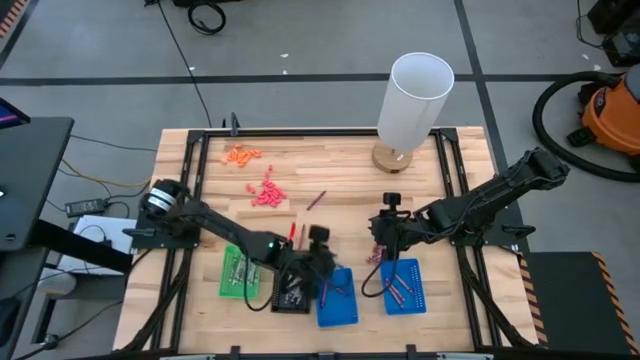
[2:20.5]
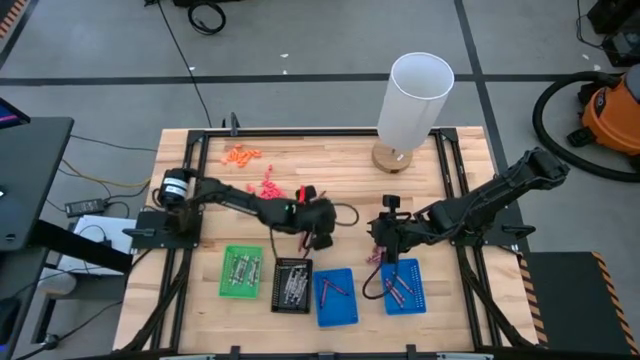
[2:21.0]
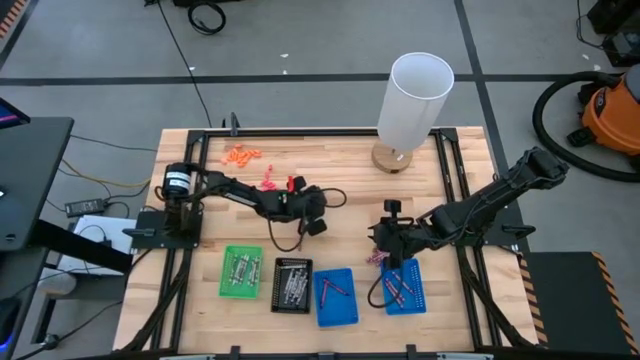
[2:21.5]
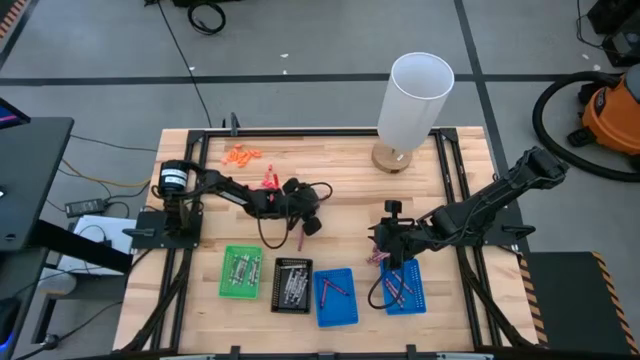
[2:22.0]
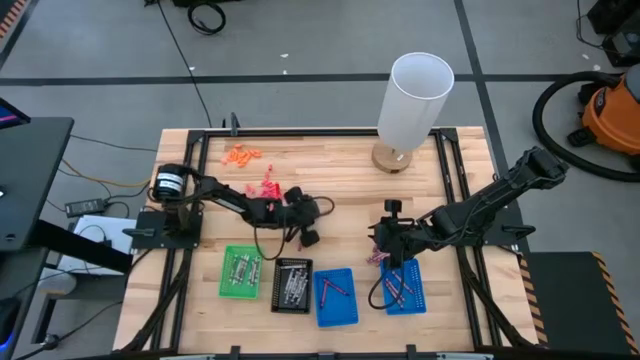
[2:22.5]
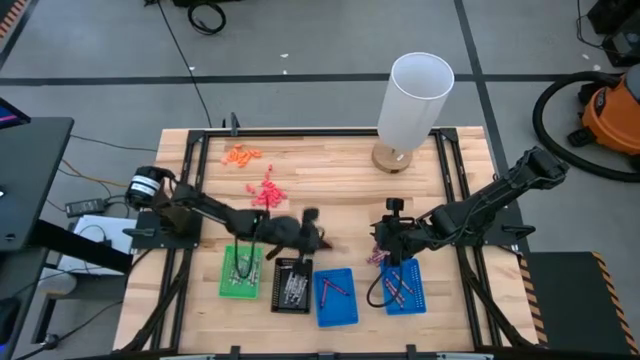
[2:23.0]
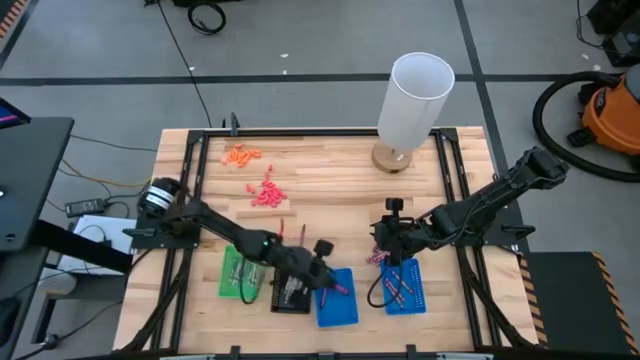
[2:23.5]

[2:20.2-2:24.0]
Task: Sort crayons
Put the red crayon into the left blue bin

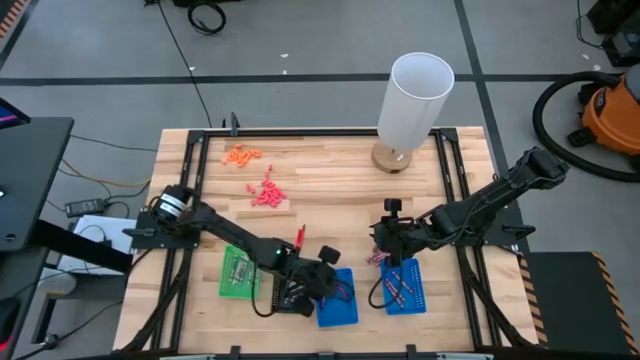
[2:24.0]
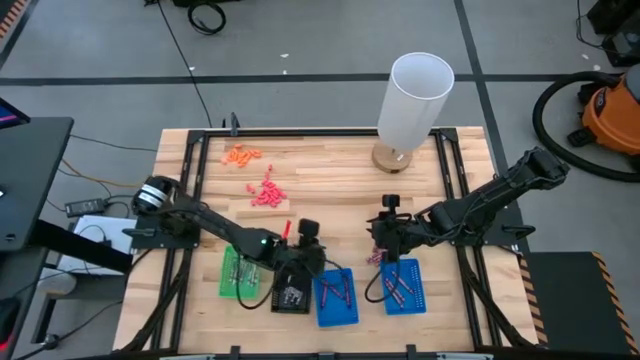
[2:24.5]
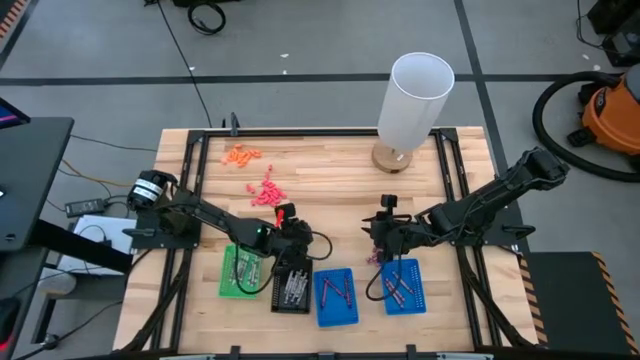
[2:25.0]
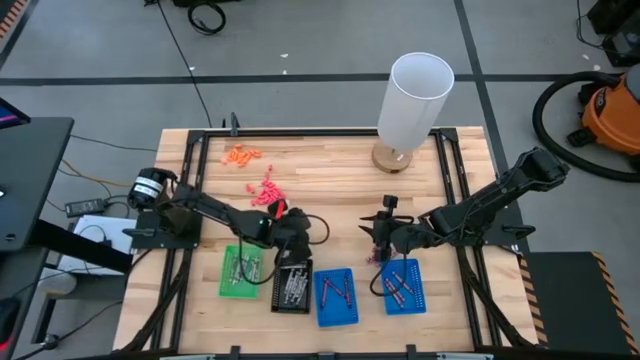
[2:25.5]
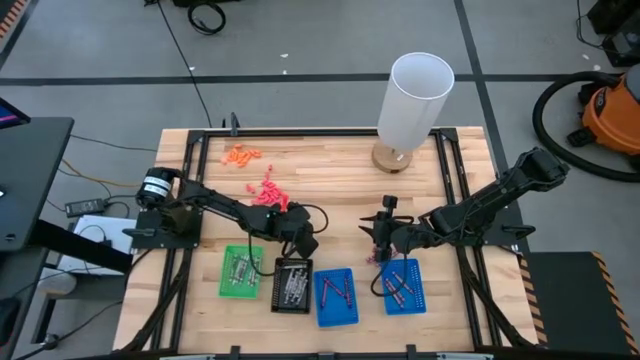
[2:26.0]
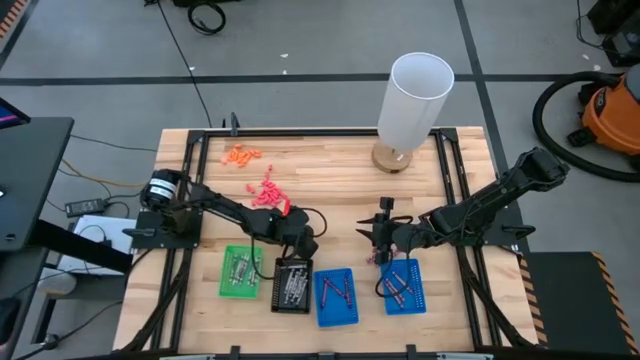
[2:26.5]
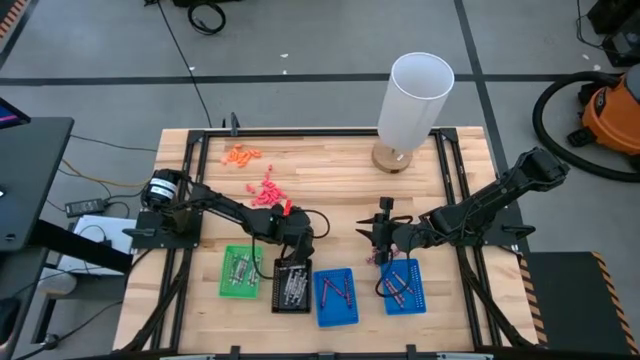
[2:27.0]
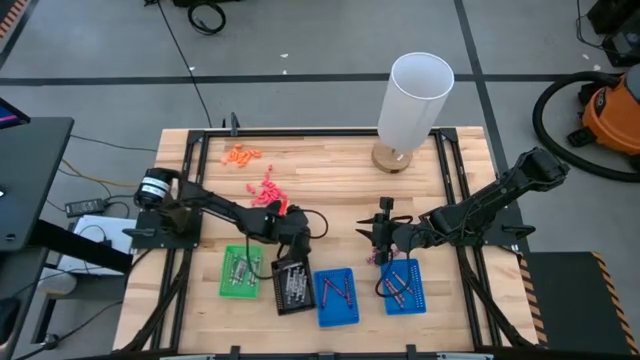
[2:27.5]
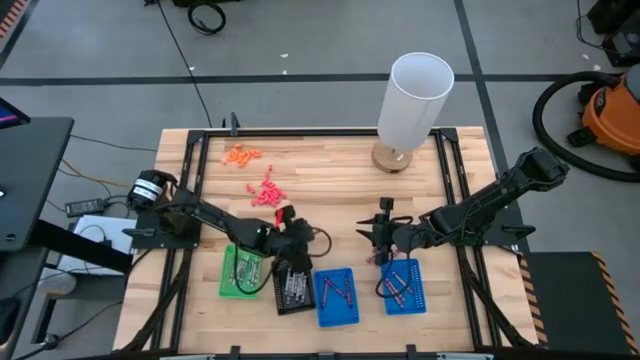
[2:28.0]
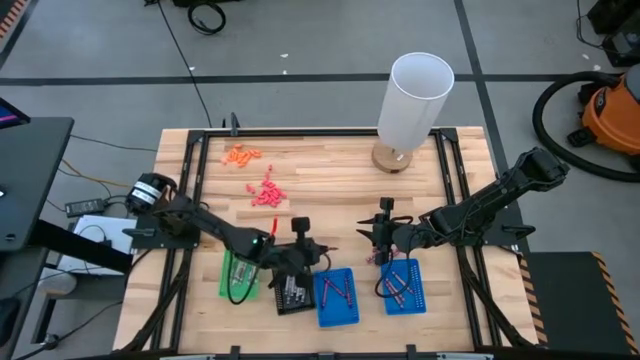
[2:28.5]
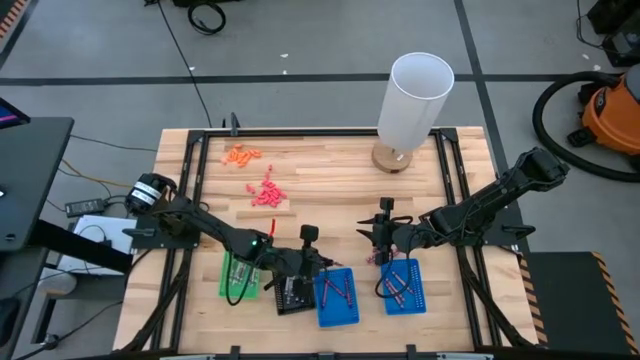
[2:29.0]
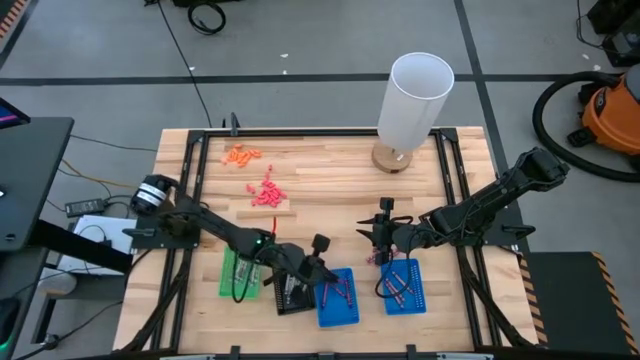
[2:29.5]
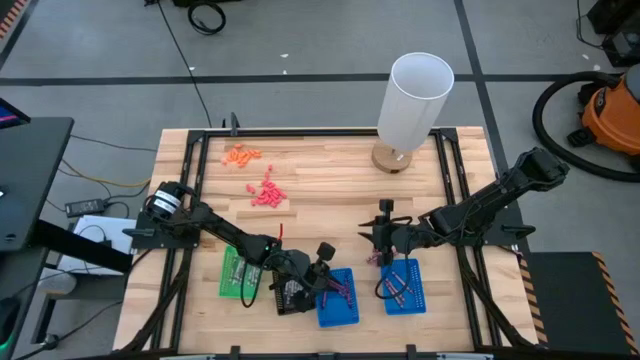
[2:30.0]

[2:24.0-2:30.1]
Put the red crayon into the left blue bin

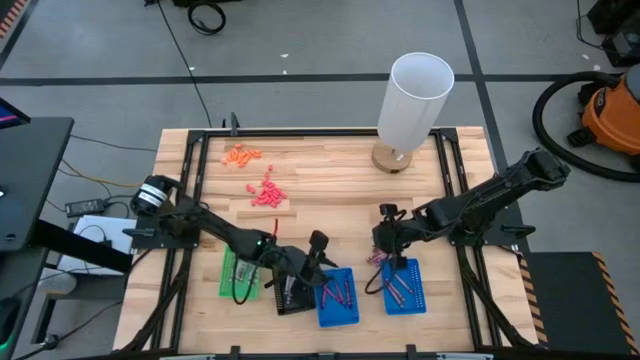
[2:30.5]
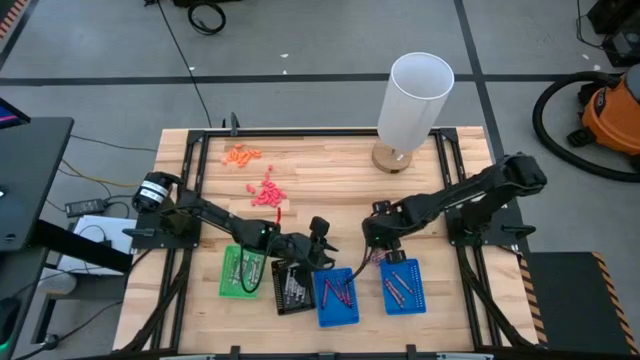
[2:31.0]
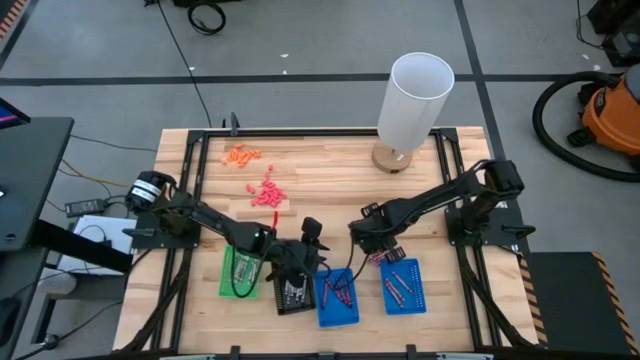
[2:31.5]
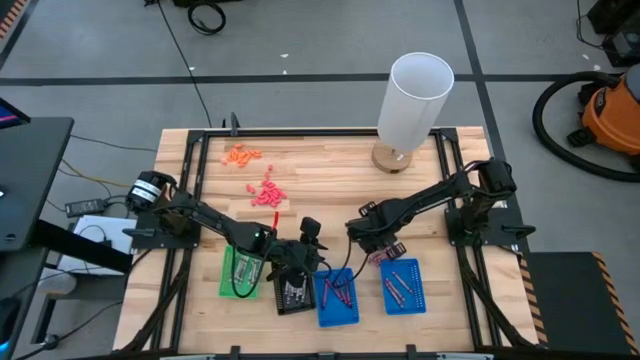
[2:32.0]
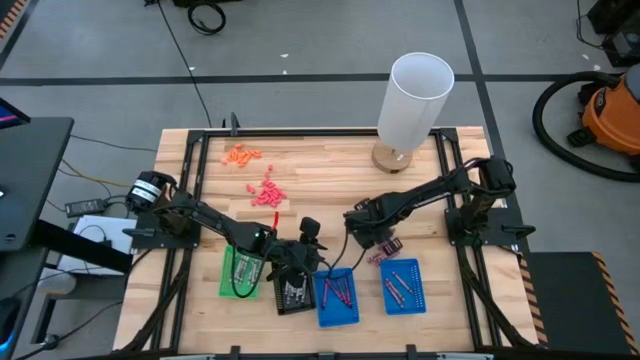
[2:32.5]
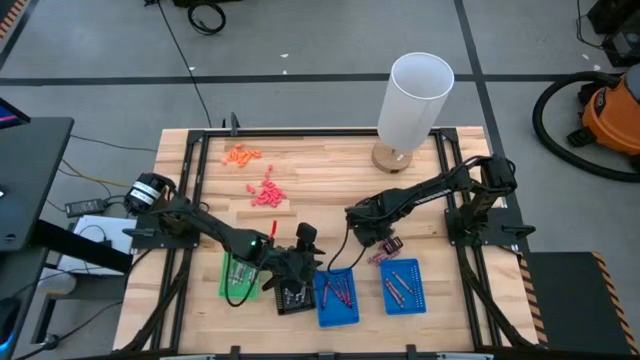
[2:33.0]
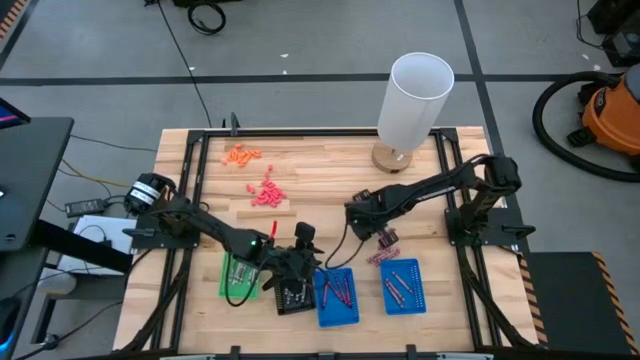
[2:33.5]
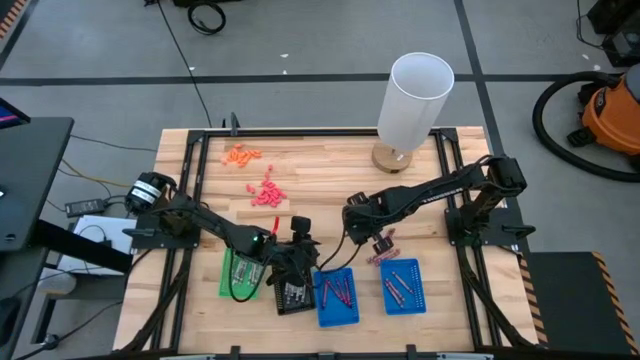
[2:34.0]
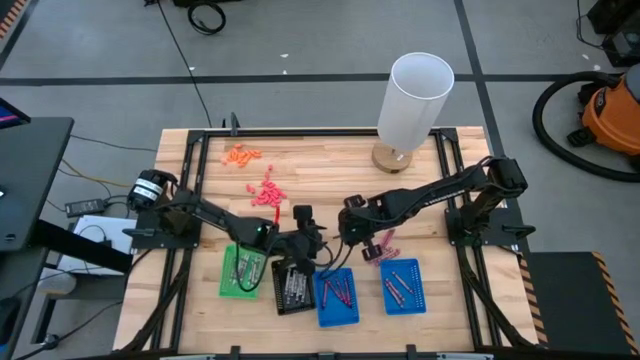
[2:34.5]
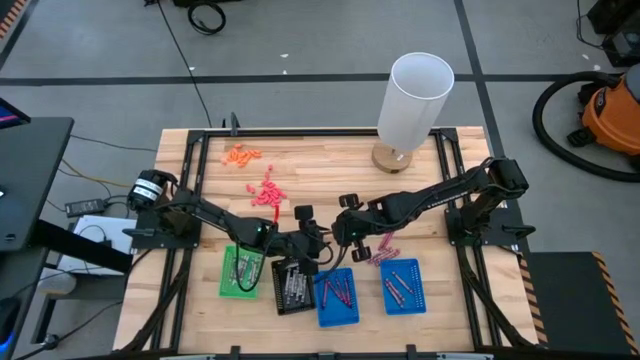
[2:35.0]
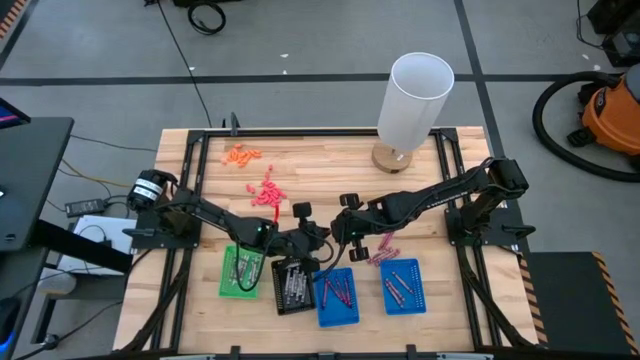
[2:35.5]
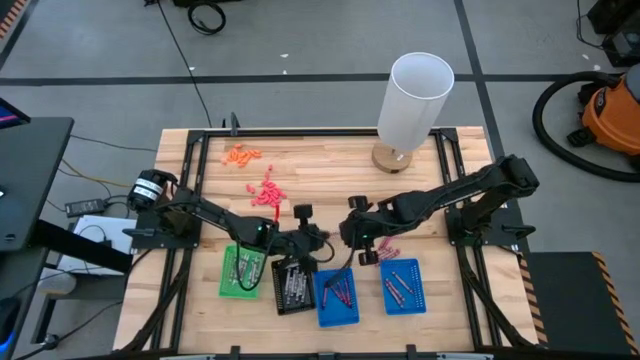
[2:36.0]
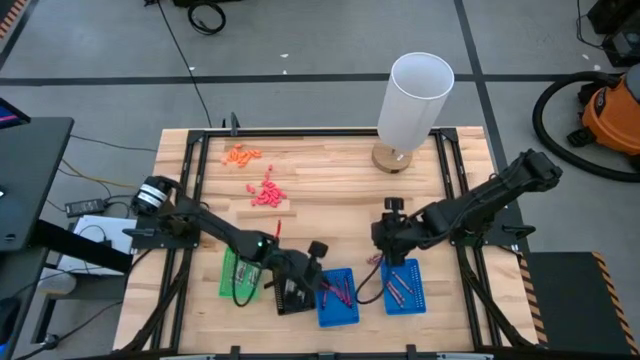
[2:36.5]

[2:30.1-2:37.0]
Put the red crayon into the left blue bin

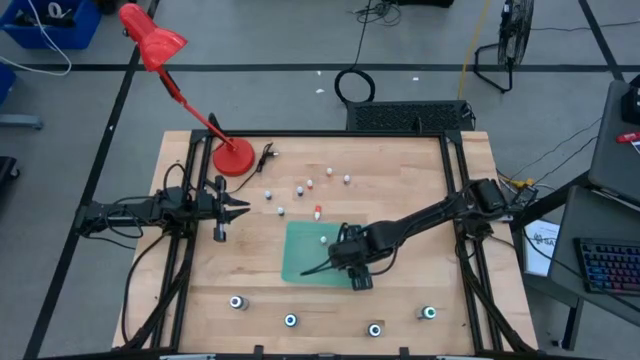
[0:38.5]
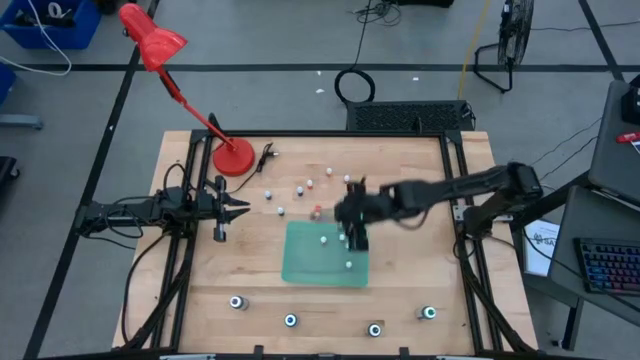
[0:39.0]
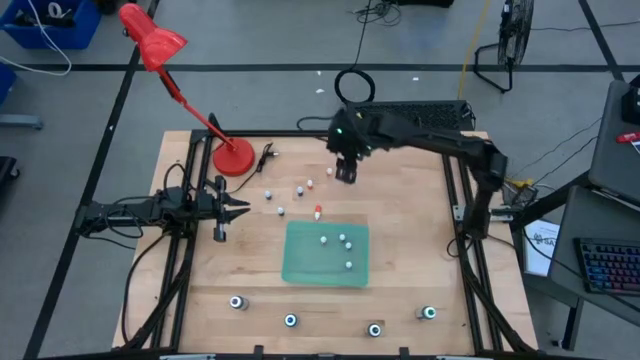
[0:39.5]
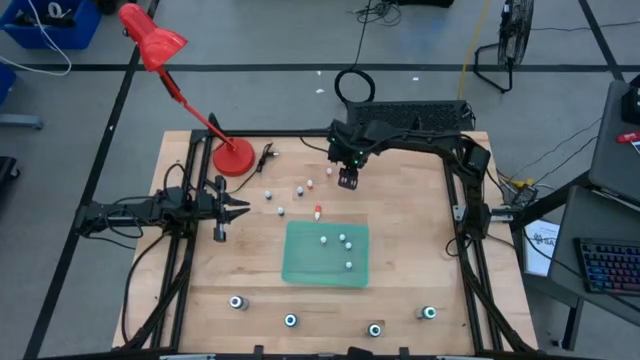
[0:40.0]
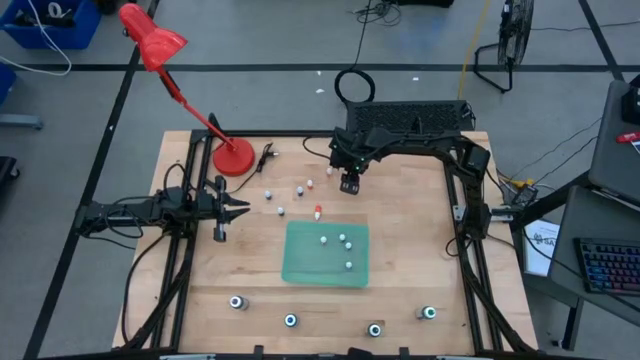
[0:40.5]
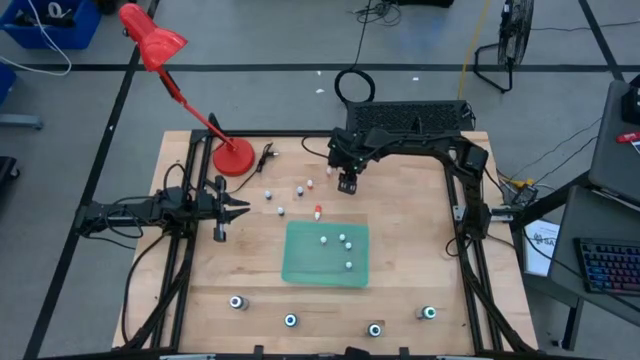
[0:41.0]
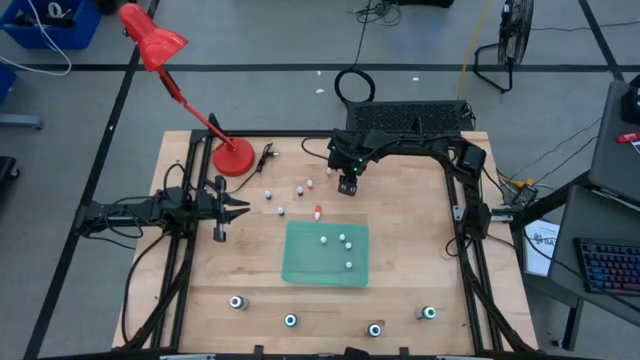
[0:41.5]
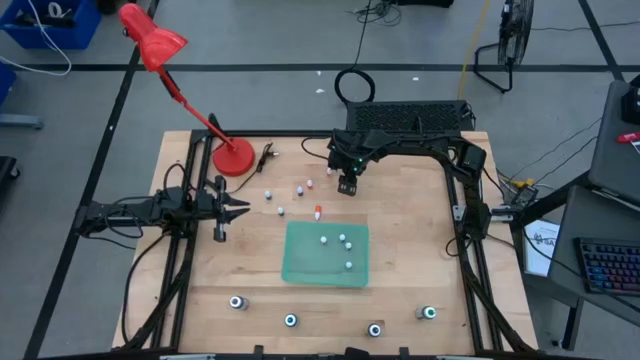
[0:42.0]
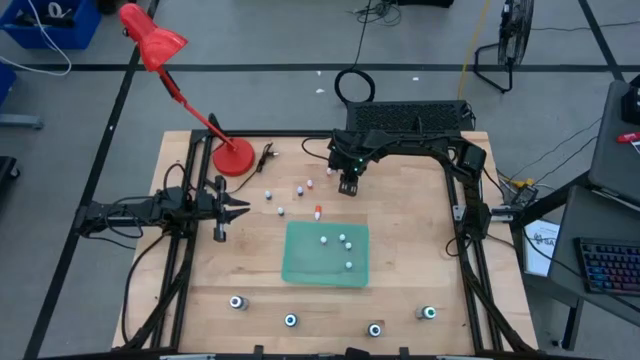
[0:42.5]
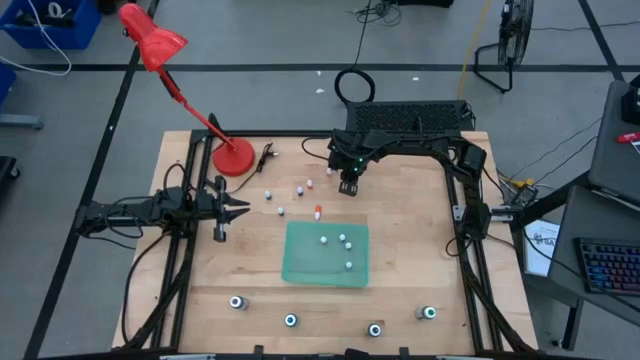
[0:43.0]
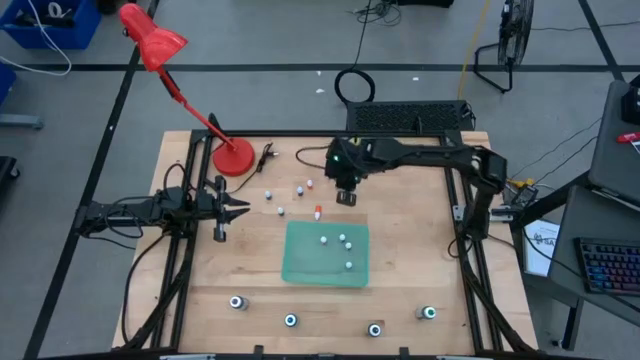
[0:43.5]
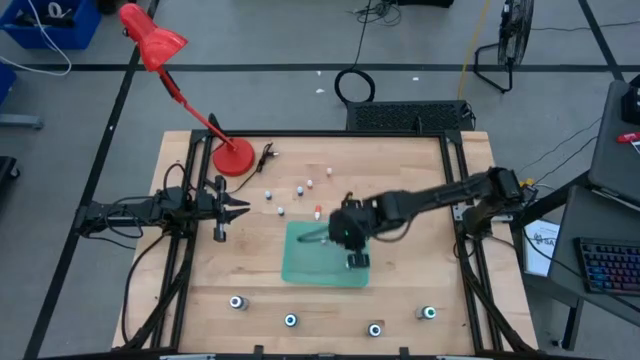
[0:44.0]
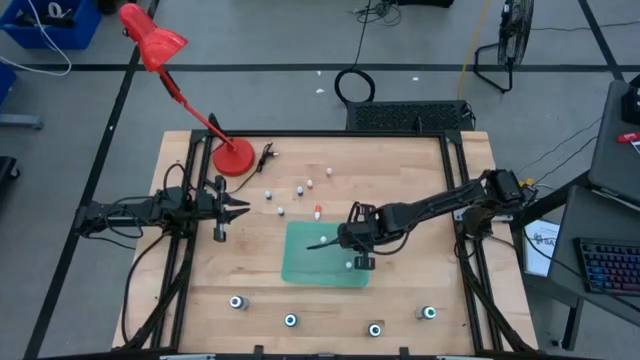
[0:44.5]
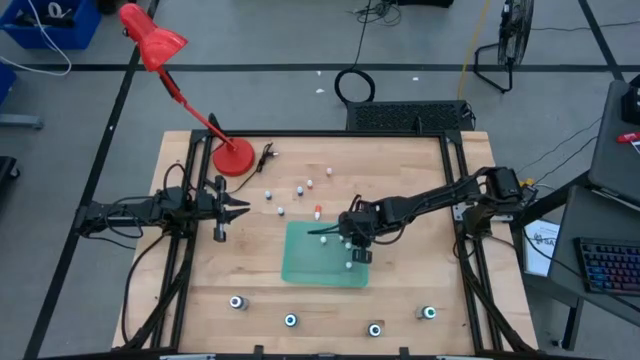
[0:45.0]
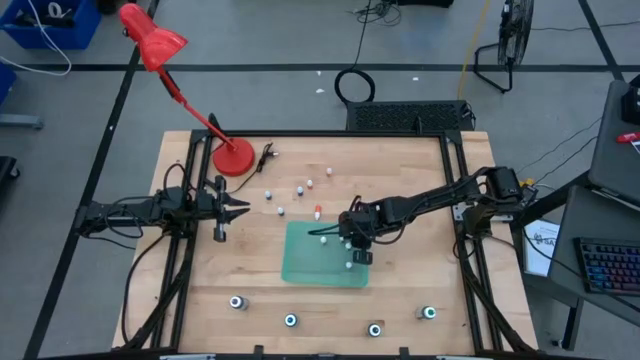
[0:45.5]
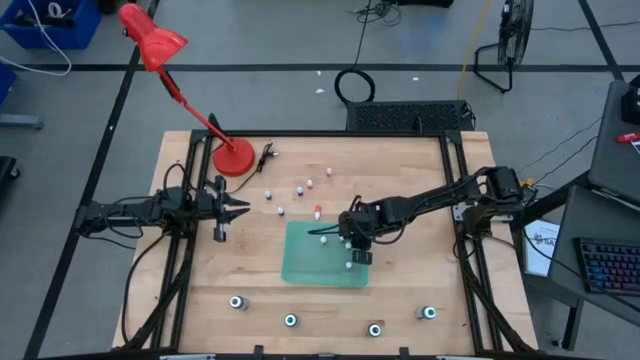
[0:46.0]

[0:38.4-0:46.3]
Task: Pick & Place food coloring
Put the small red food coloring bottle into the green bin
